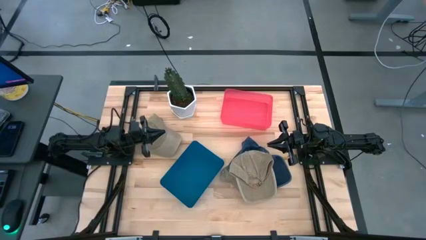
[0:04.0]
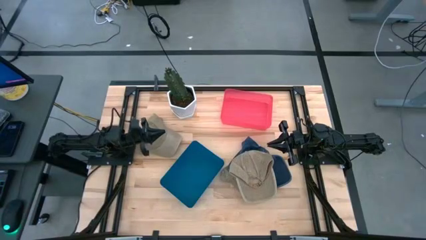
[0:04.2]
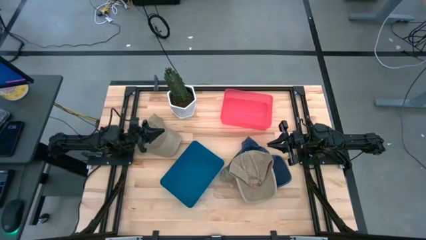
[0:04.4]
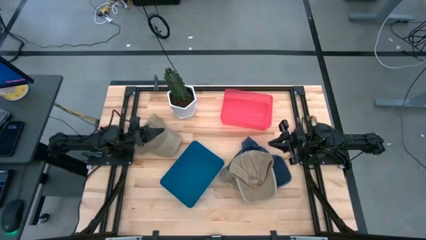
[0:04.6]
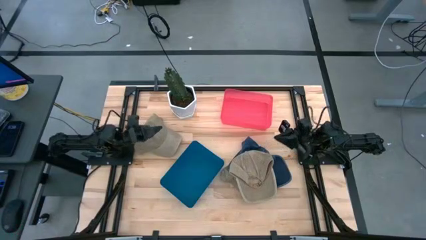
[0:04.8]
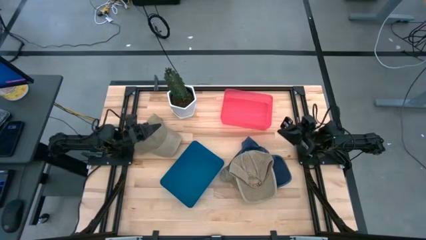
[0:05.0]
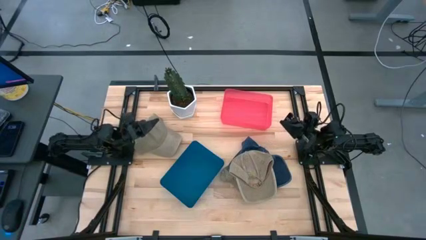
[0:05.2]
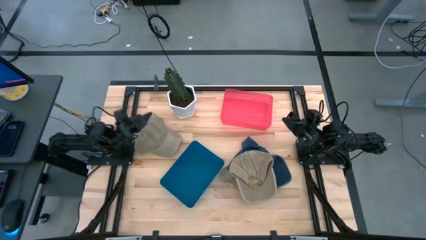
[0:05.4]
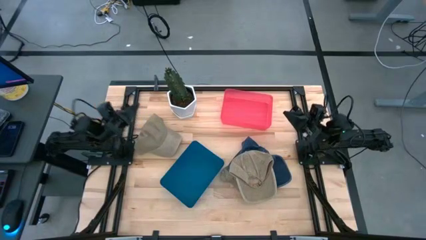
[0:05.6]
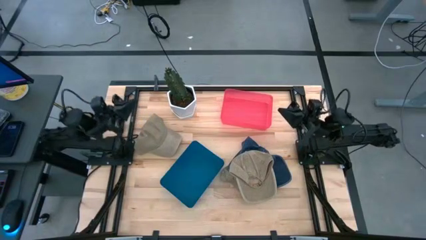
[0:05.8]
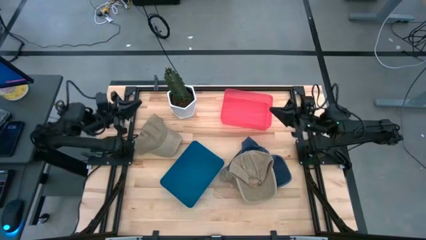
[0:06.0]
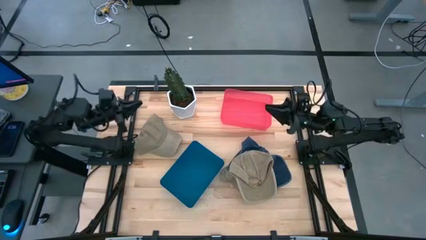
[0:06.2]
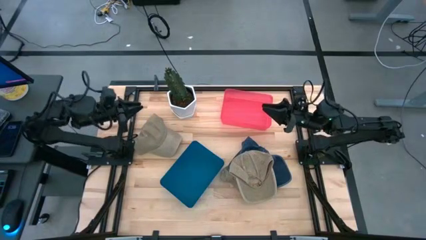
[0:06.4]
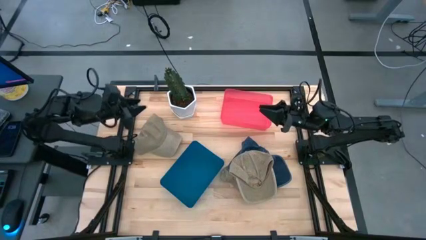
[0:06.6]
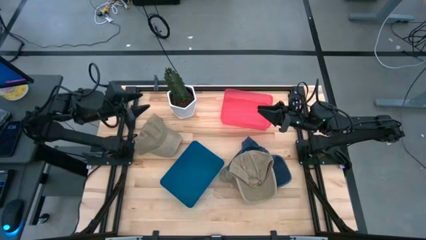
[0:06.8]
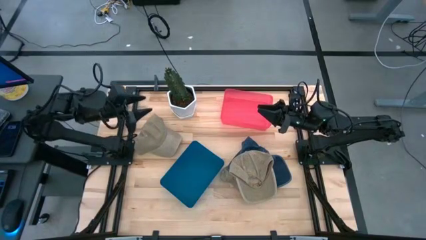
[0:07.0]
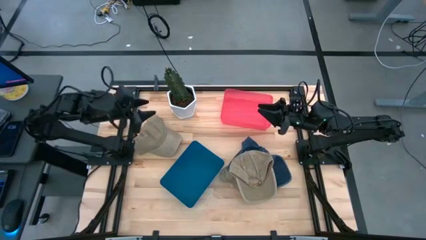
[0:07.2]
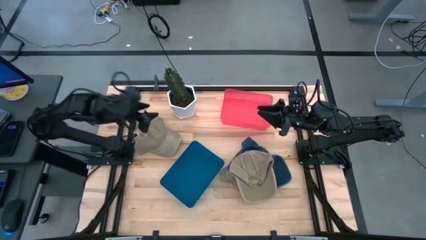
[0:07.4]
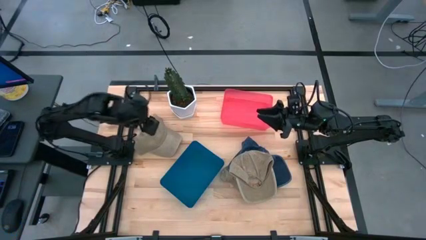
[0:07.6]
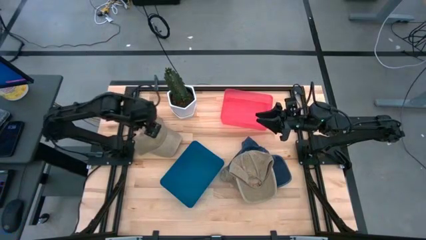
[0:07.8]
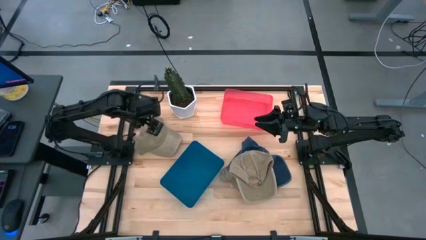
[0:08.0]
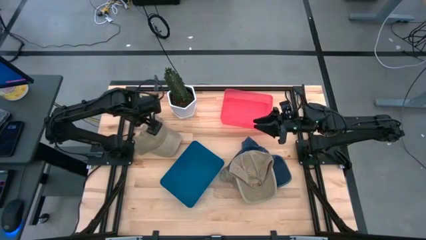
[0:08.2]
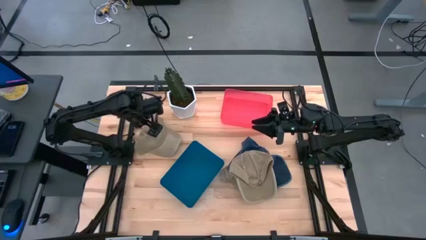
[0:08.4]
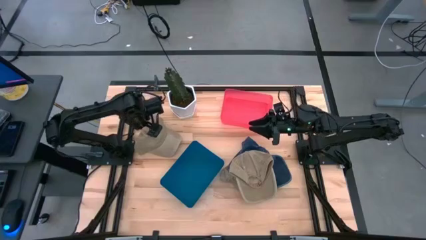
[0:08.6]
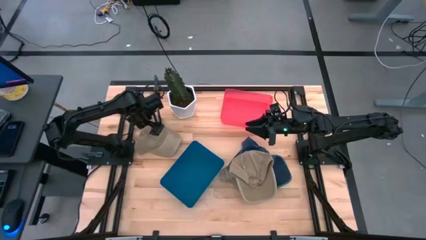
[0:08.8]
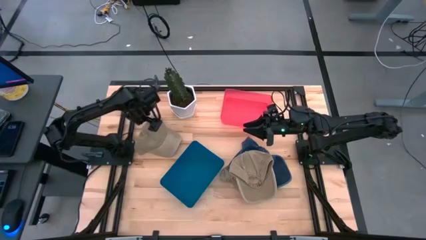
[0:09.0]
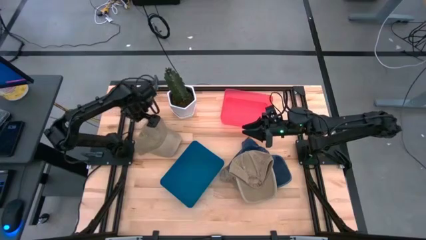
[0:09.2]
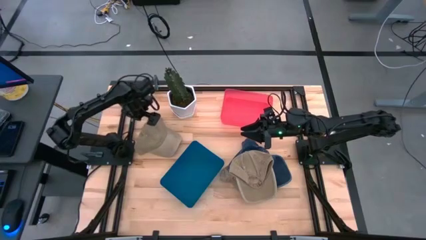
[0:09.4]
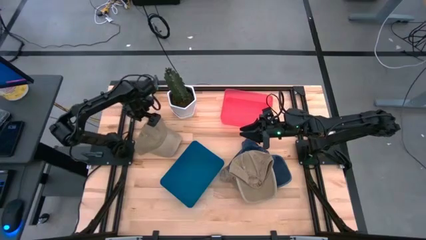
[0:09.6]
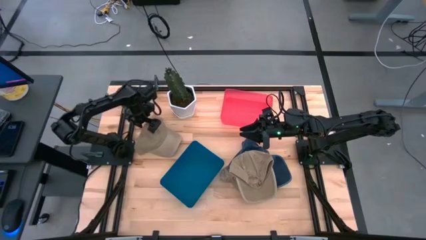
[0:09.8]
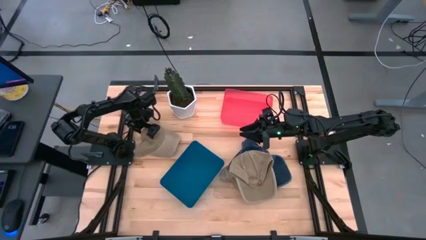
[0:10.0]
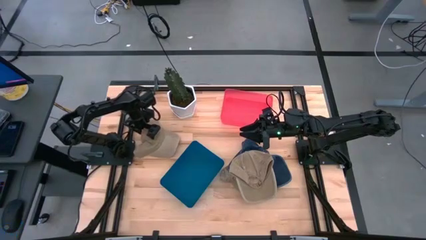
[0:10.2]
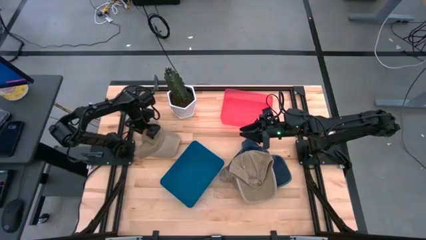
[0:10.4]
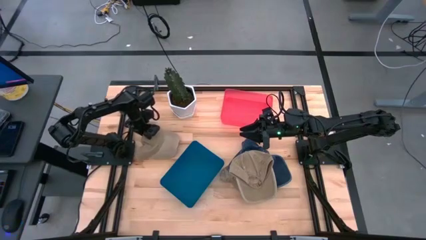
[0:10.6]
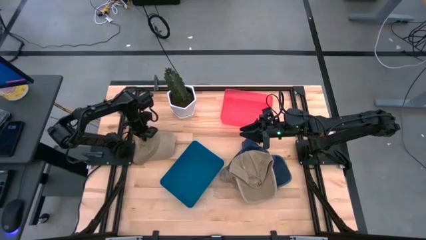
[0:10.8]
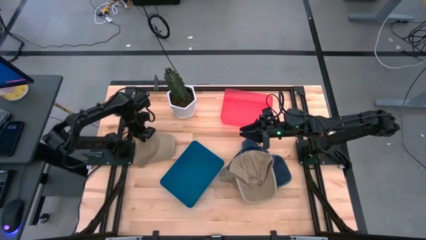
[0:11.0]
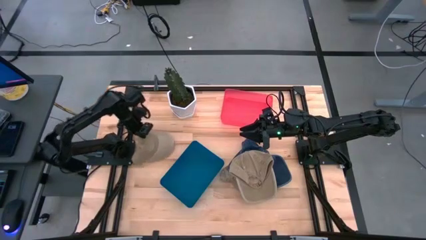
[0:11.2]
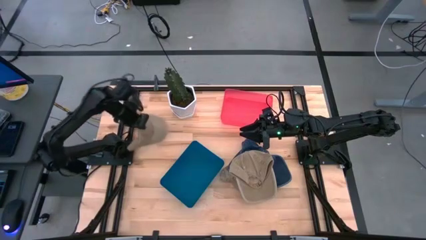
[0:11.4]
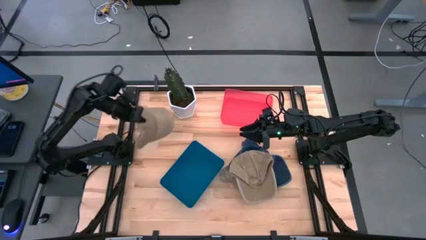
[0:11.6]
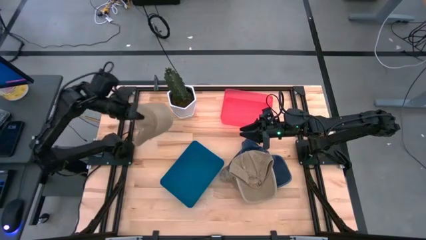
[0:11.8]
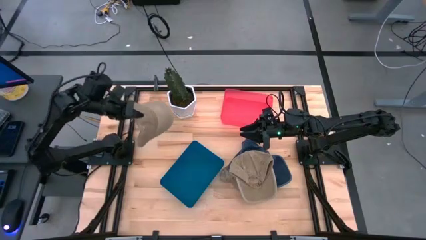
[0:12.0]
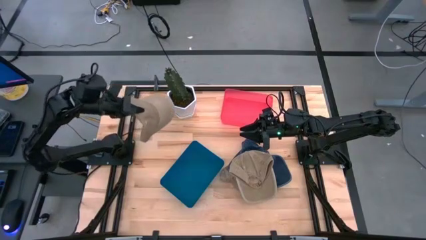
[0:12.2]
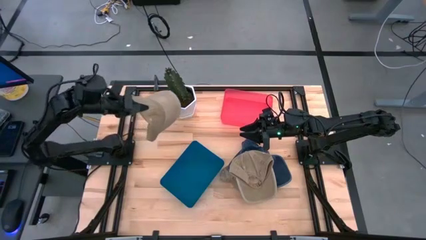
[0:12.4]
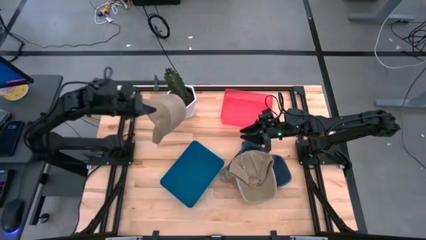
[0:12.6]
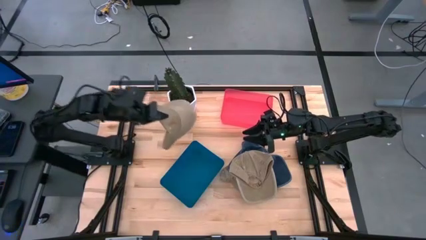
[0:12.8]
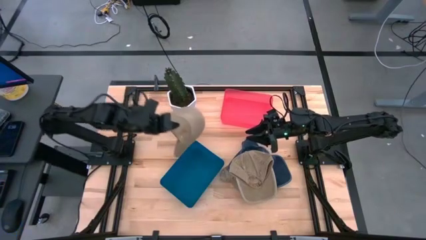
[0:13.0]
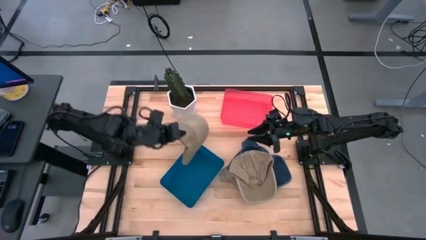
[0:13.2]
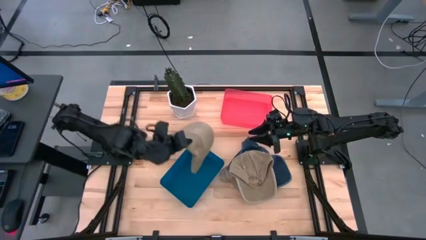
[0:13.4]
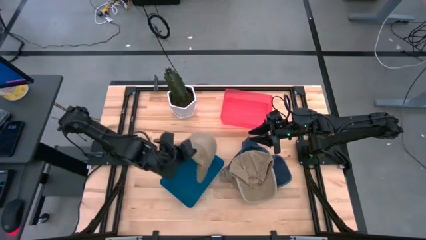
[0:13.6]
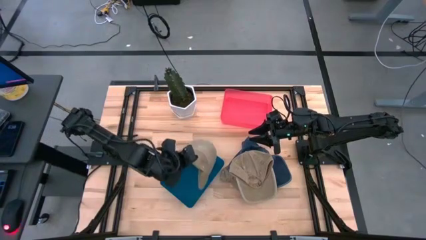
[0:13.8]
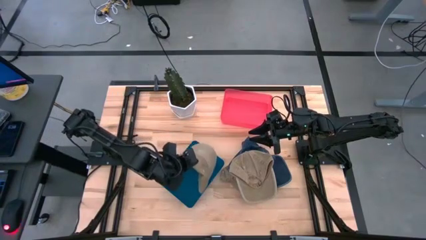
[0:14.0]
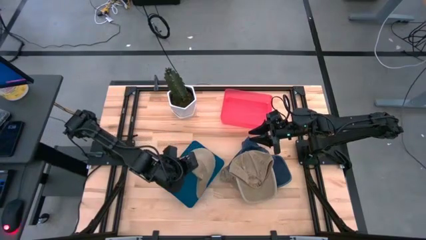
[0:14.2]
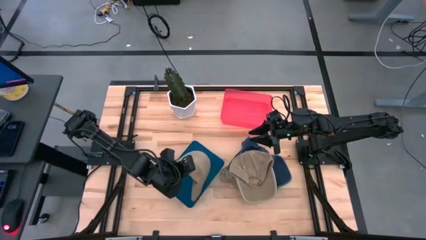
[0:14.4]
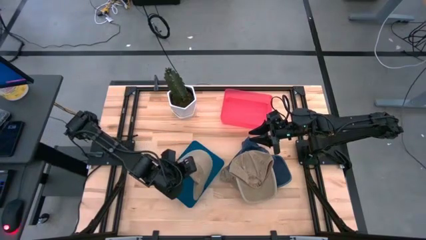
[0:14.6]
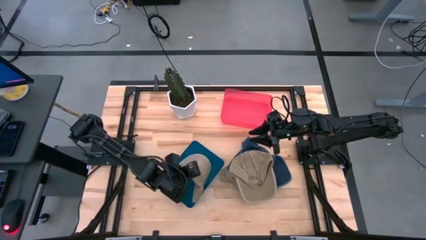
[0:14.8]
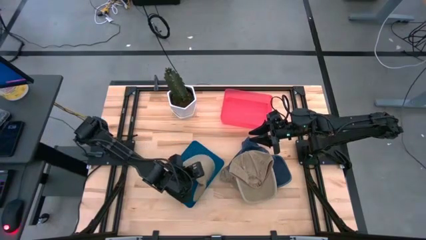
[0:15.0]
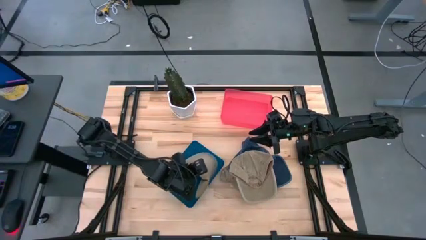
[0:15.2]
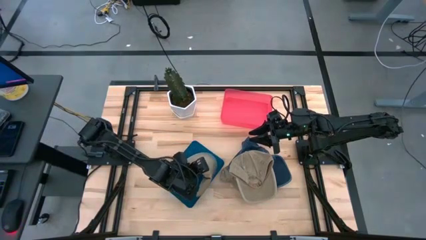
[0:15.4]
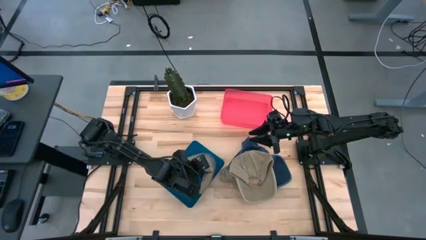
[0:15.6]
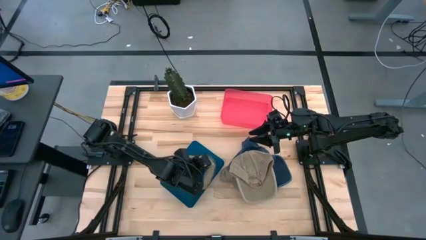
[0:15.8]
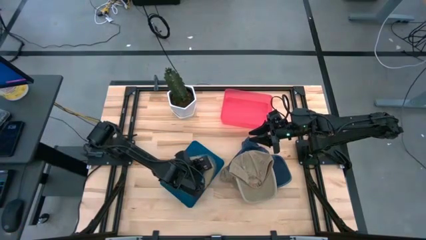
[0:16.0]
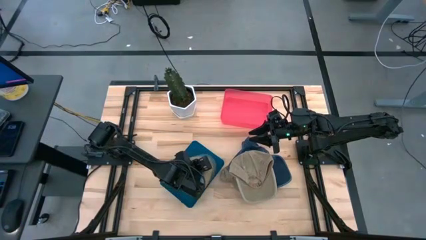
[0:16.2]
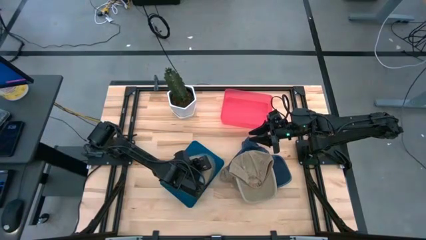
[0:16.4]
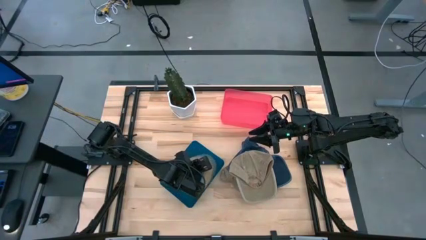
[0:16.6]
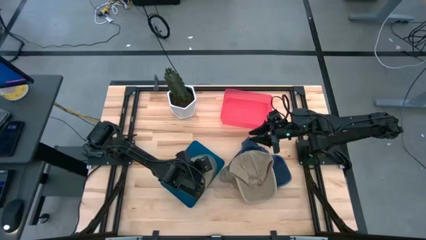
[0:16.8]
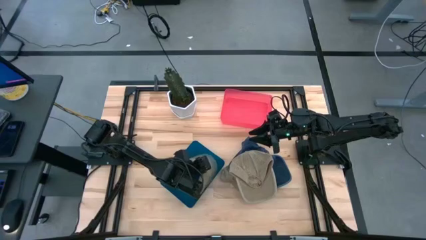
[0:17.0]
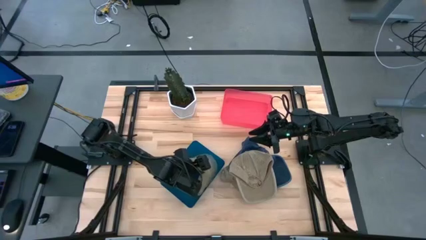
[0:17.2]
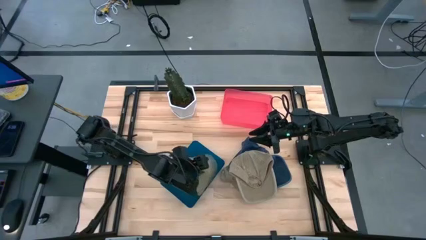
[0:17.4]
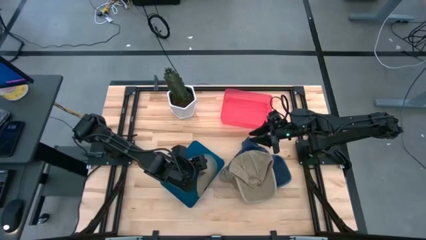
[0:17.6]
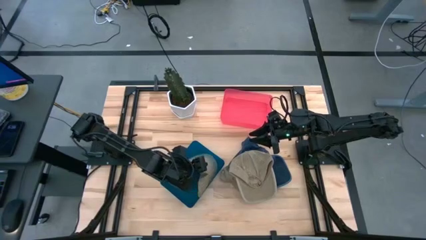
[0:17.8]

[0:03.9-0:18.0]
Task: Pick & Place hat
Put the brown cap into the blue bin

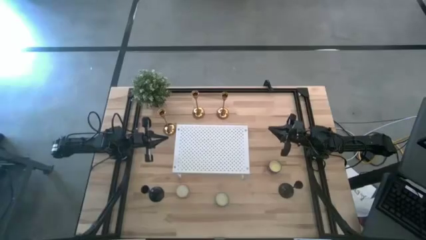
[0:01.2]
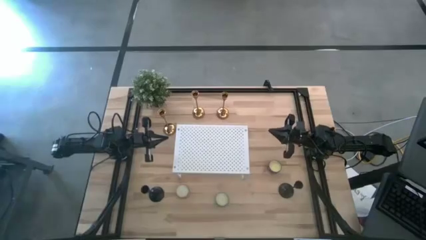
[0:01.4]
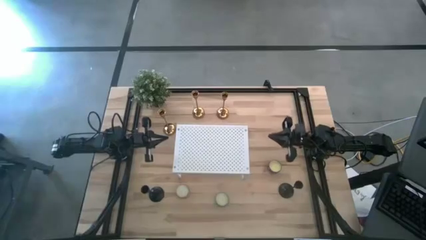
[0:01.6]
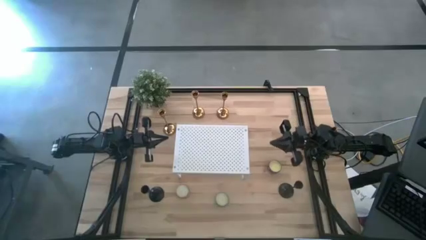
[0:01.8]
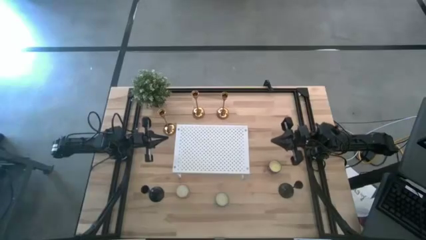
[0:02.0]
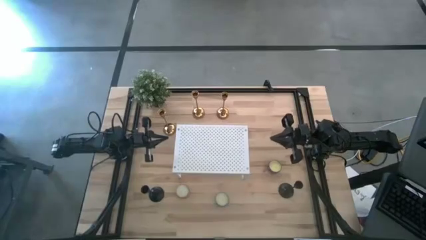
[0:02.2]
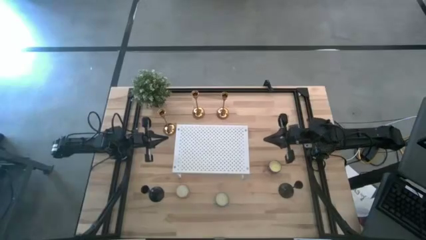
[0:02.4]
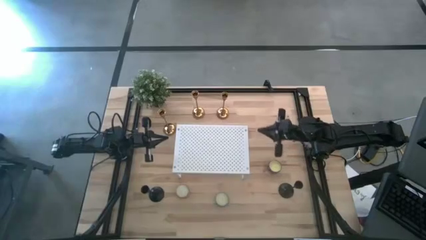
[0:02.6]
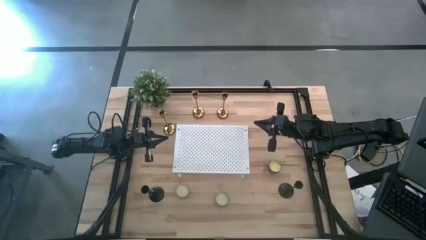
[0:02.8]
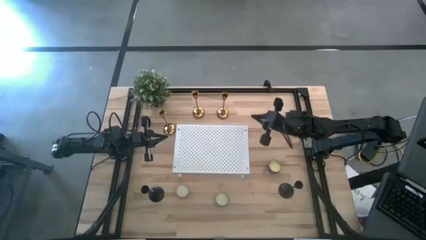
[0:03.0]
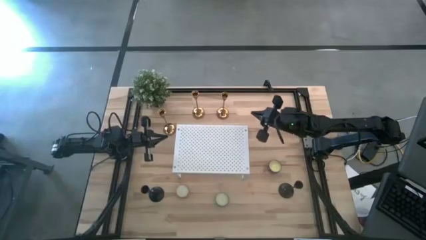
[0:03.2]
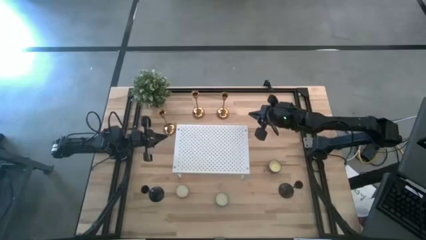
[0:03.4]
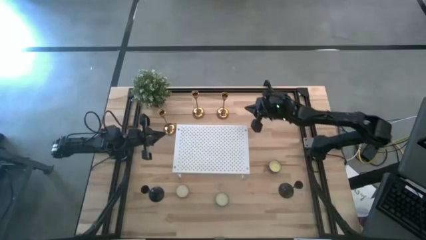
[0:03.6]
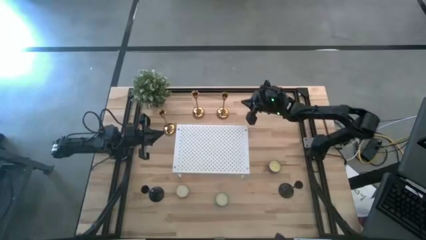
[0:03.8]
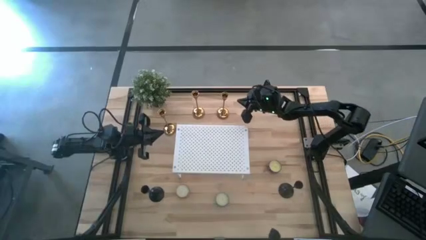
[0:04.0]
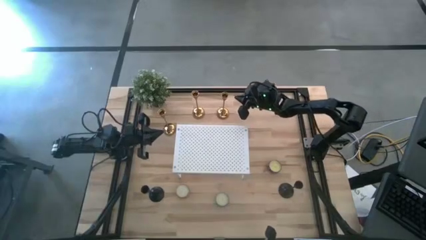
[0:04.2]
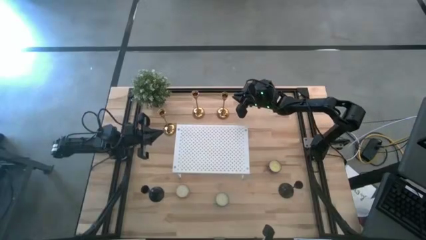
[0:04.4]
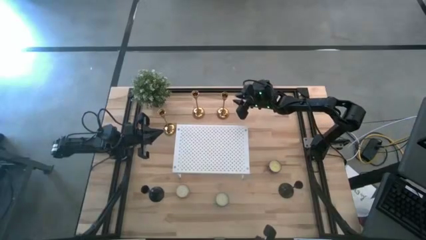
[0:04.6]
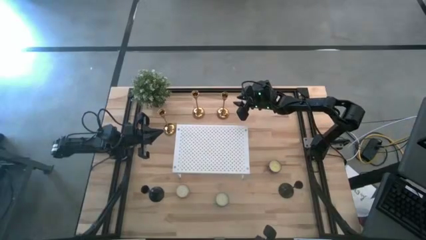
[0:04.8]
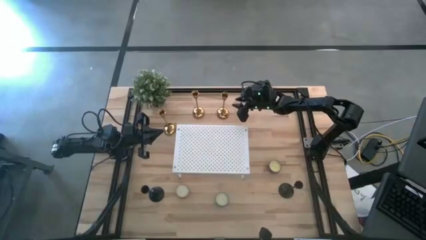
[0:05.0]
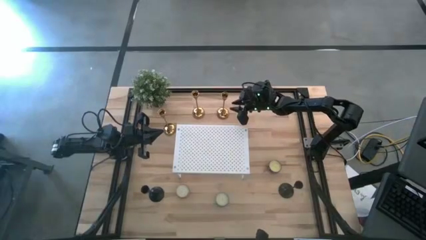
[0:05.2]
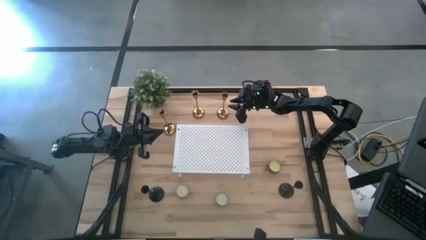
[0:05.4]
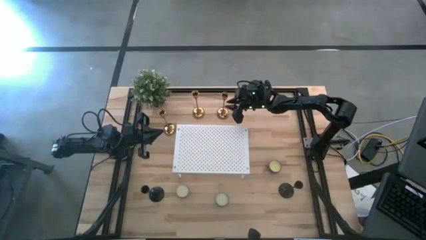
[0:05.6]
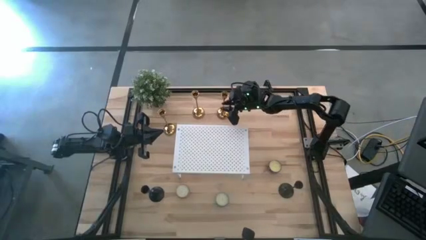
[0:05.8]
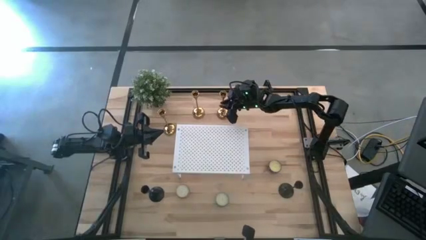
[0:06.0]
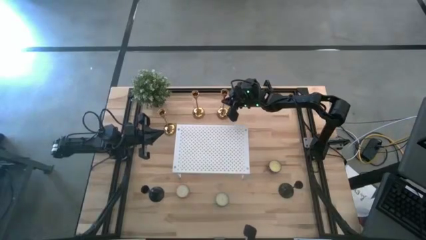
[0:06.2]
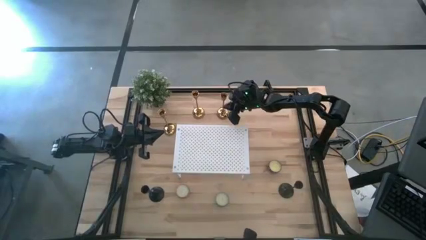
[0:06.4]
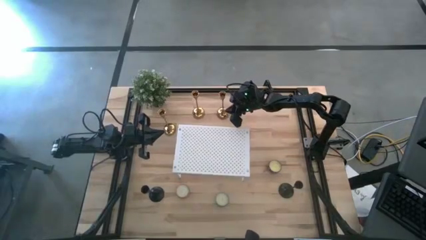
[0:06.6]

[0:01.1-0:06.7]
Task: Pick & Place candle stick holders
Put the top right golden candle holder on the shelf
